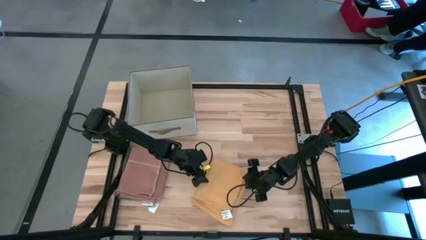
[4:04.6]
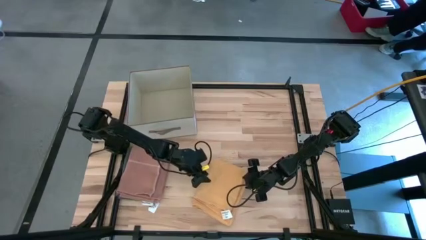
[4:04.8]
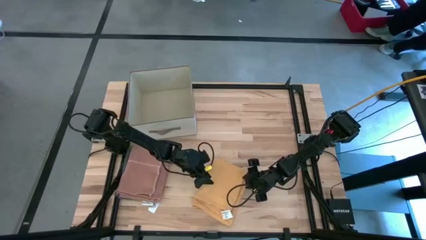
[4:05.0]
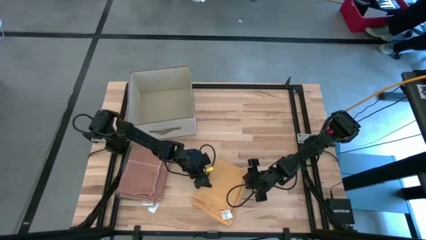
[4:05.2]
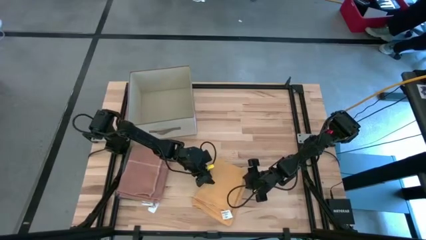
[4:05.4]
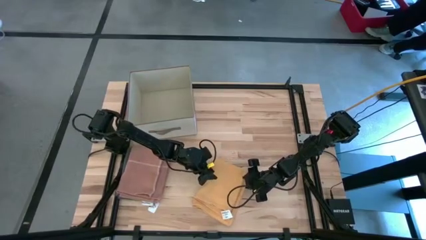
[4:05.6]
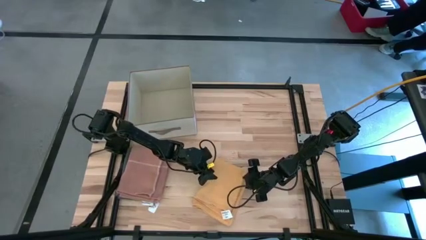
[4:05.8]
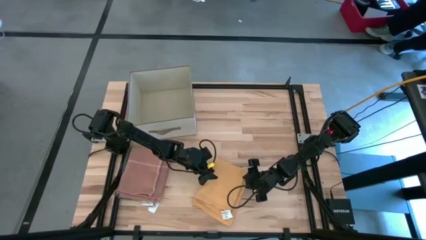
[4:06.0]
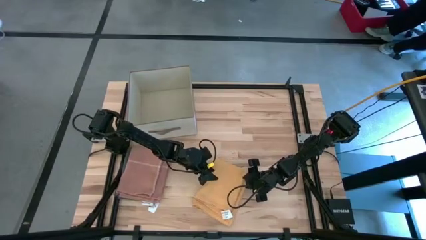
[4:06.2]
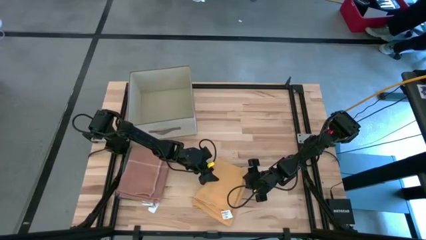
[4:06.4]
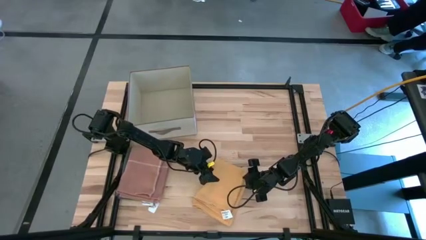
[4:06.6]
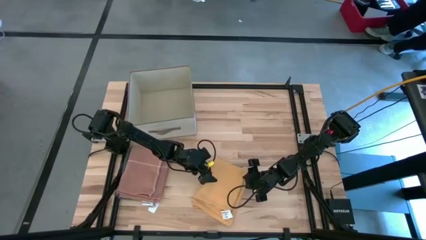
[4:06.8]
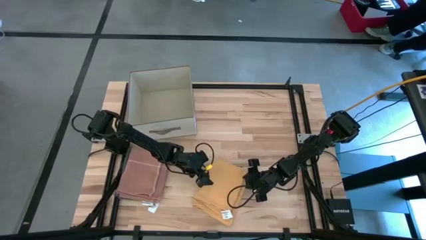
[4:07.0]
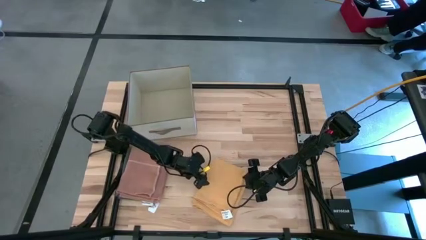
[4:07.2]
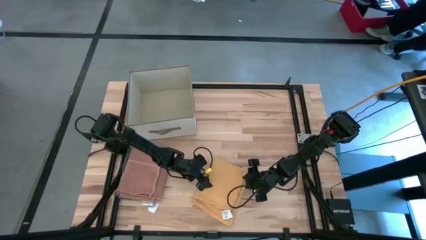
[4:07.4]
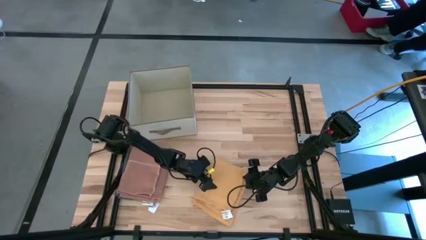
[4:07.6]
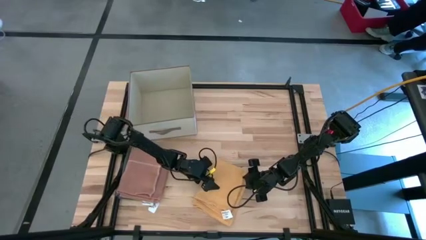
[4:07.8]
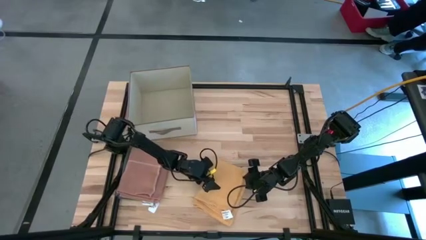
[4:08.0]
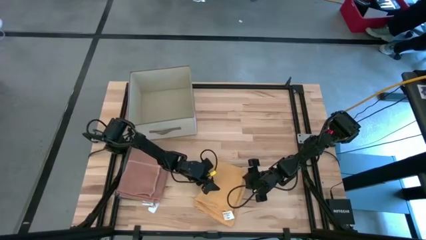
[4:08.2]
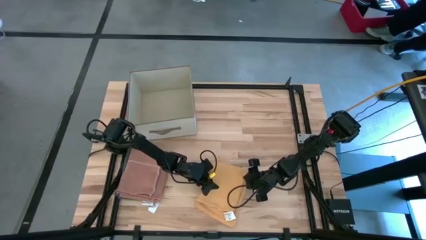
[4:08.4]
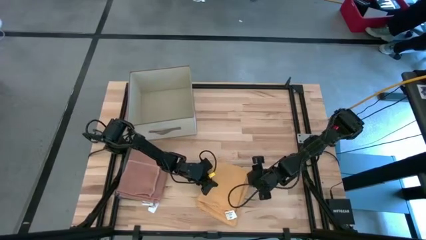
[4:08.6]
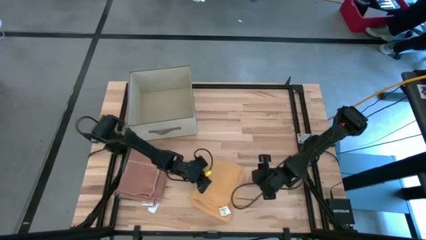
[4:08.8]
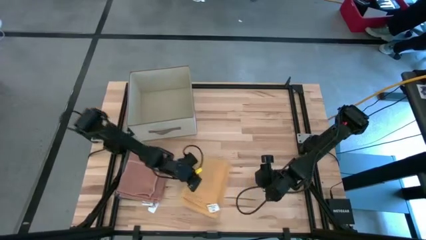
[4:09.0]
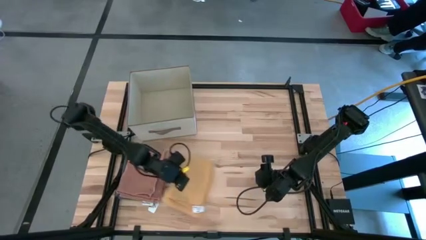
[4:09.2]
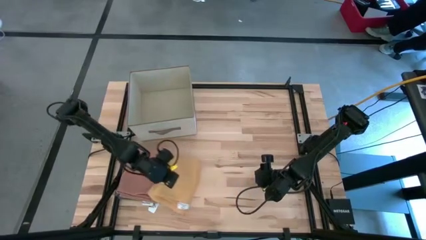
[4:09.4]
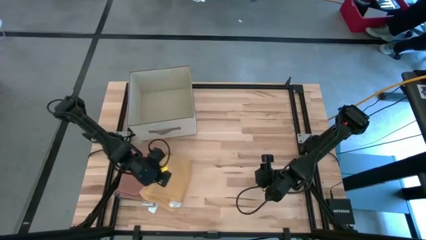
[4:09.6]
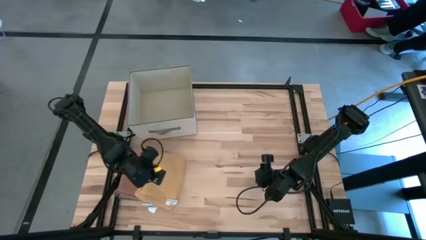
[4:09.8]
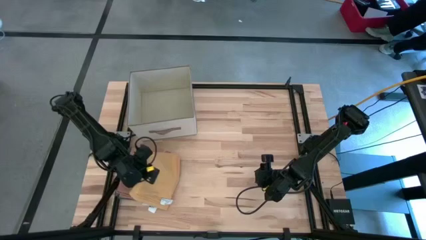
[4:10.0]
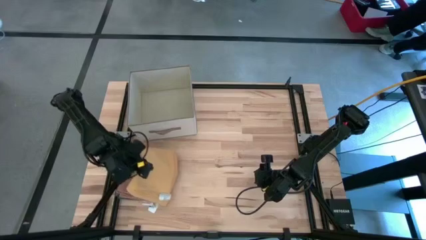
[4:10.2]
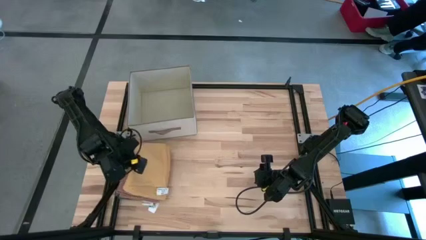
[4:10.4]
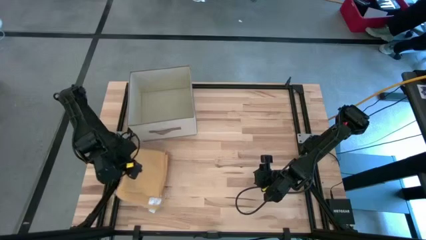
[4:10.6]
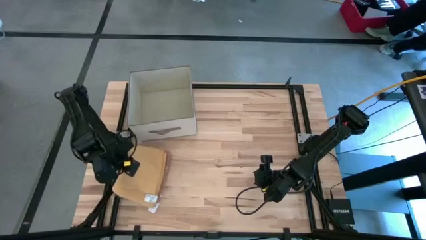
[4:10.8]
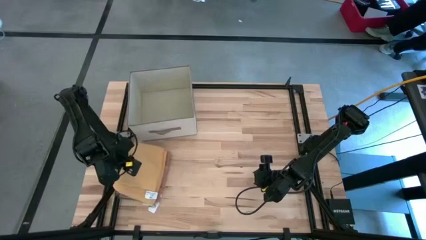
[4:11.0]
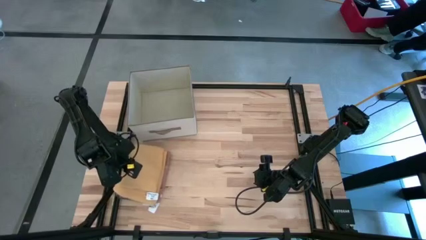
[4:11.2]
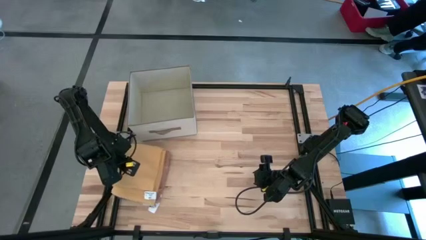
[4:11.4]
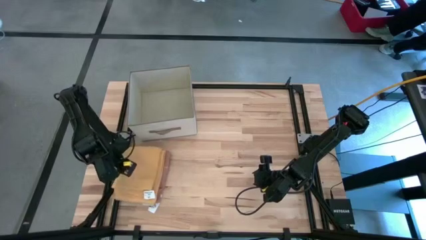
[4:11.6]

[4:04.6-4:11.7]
Task: Fold towel
Stack the yellow towel on the light orange towel

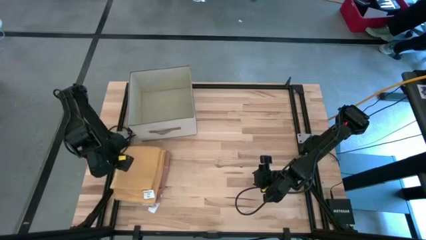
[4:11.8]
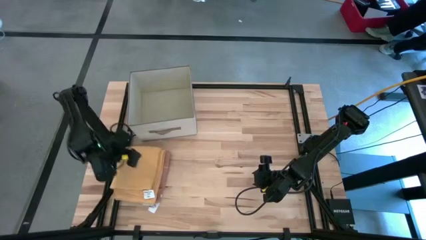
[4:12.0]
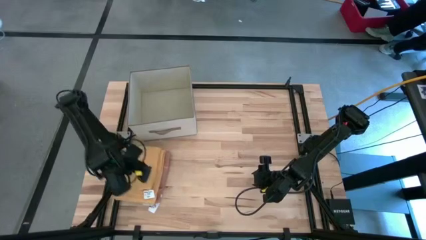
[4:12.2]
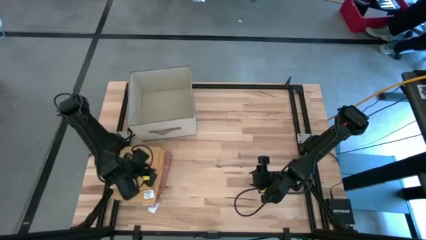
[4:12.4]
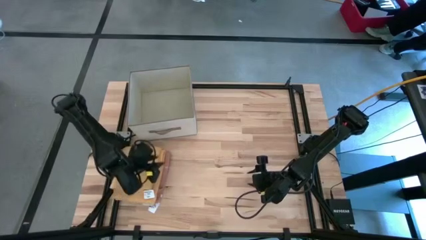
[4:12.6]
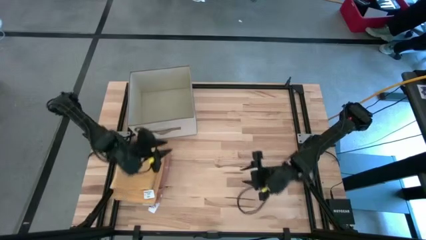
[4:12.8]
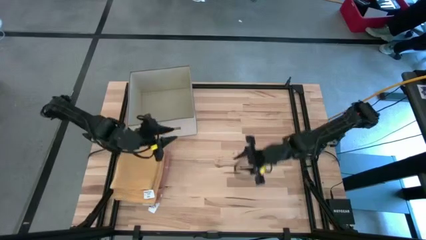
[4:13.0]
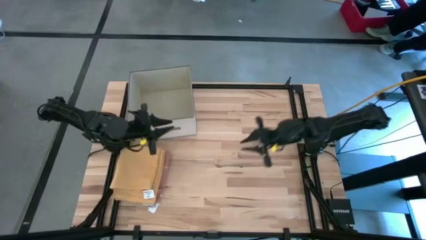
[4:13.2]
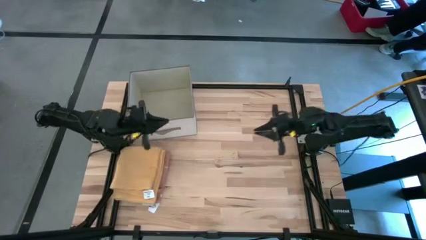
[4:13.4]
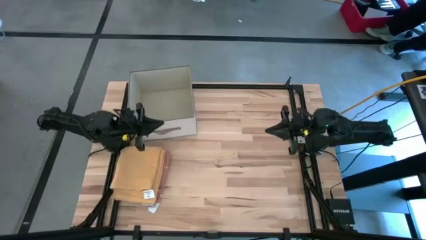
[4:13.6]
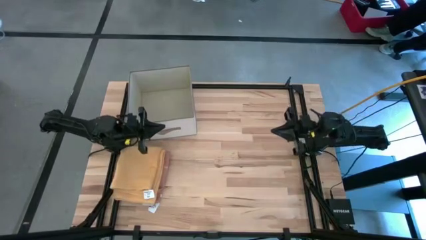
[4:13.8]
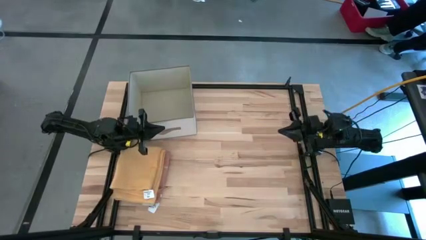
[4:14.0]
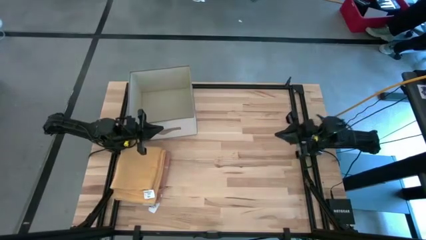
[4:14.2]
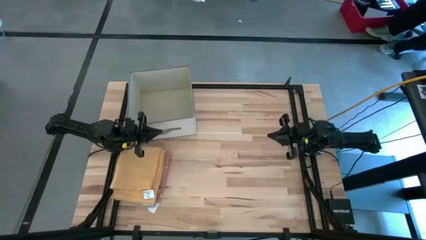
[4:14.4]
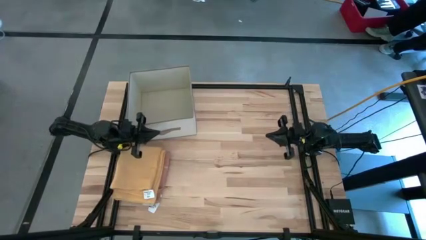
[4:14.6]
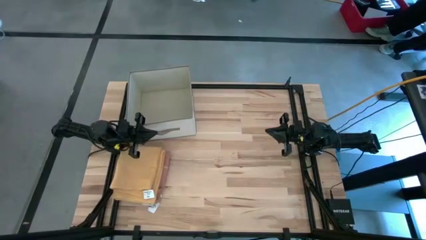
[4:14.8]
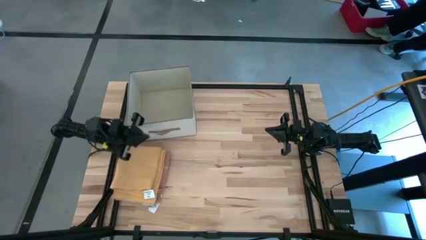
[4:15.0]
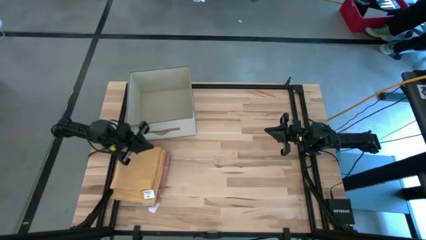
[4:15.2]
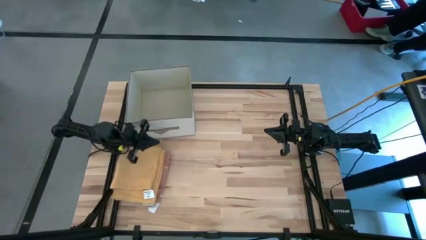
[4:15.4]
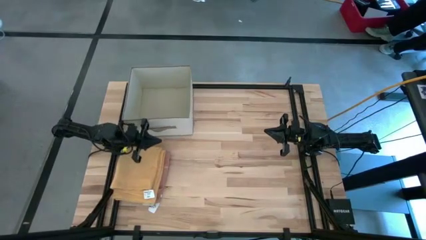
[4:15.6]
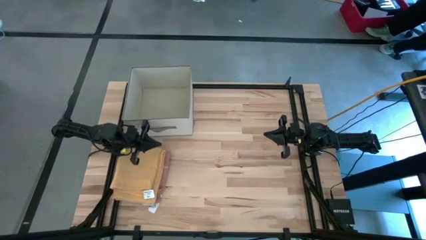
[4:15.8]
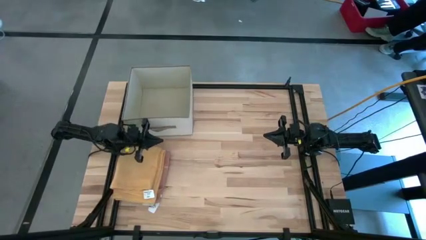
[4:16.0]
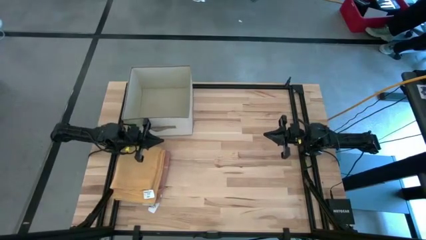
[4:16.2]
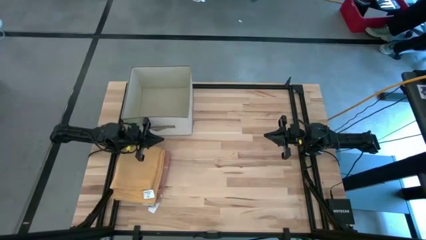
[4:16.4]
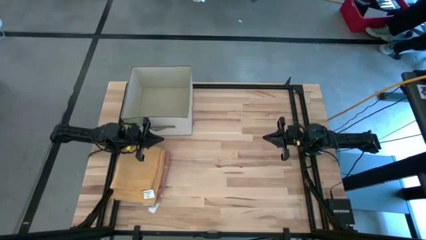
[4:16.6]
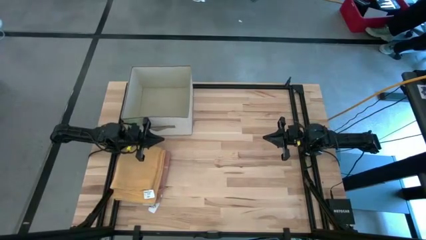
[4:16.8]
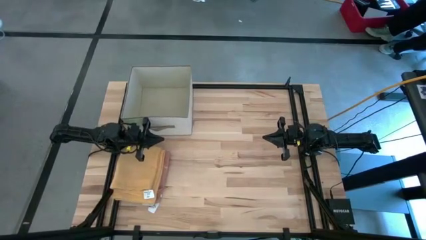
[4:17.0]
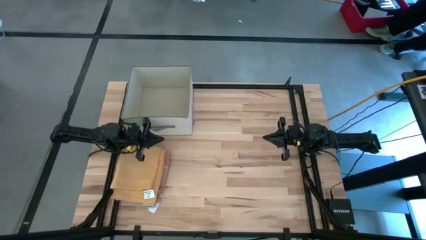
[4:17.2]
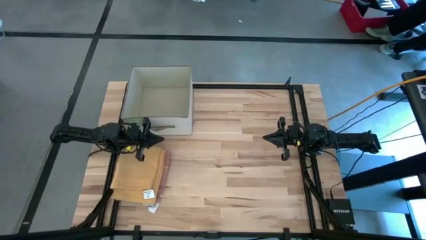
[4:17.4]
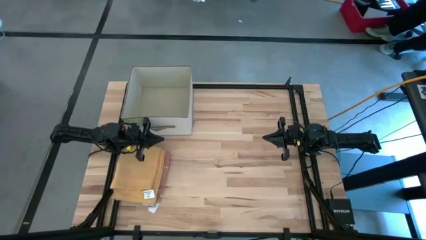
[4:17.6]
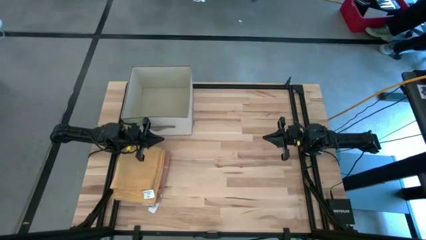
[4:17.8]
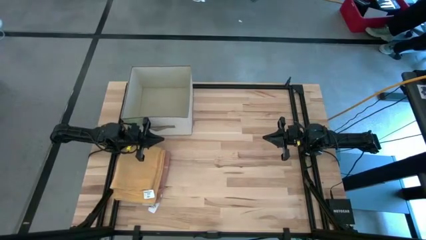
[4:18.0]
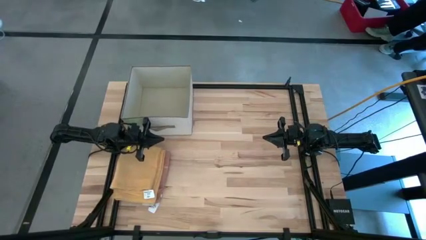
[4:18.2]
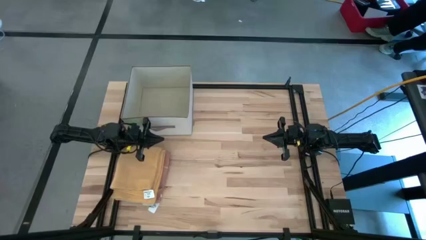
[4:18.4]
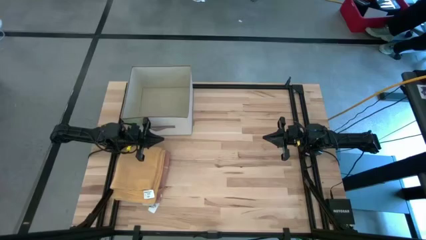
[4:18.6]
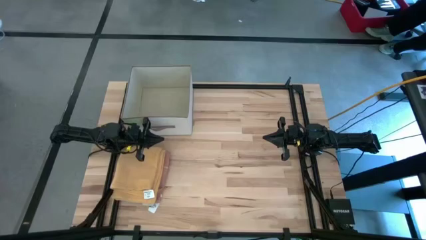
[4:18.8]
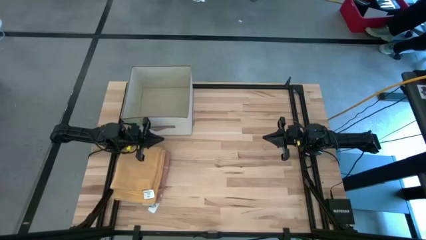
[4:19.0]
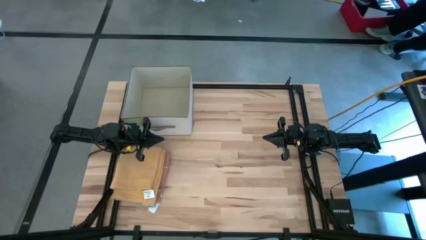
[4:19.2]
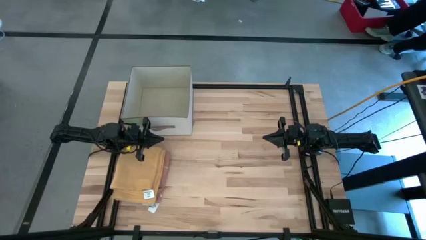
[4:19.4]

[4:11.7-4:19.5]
Return to Home Position

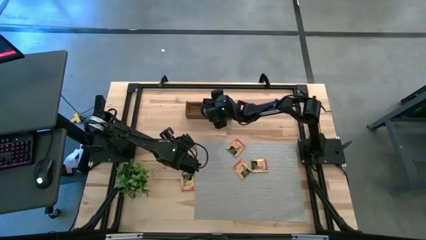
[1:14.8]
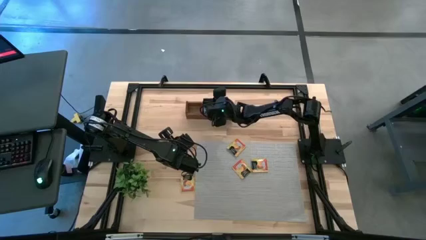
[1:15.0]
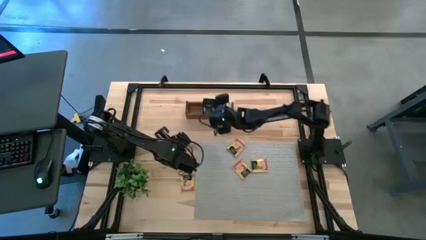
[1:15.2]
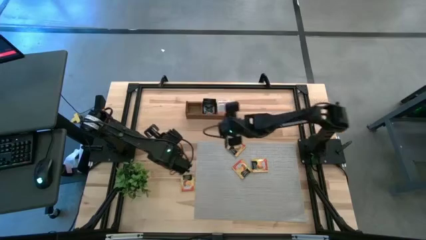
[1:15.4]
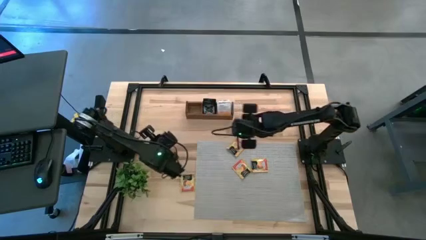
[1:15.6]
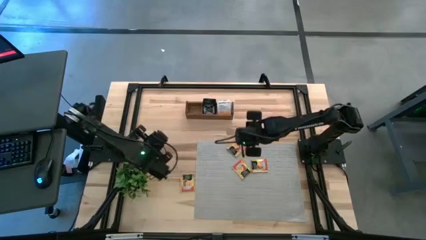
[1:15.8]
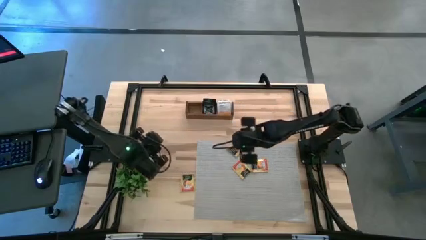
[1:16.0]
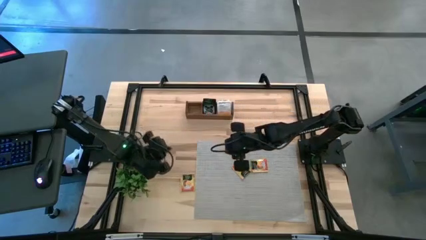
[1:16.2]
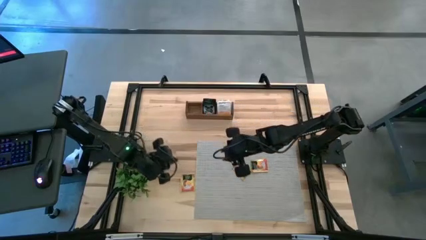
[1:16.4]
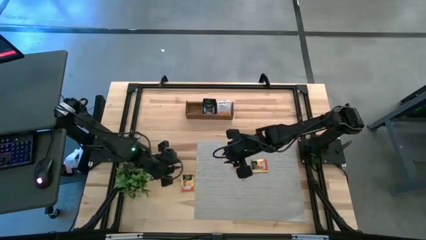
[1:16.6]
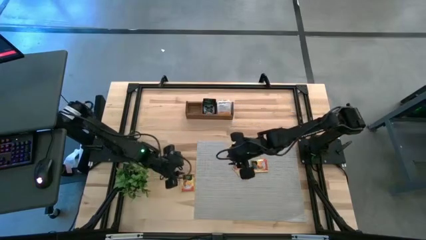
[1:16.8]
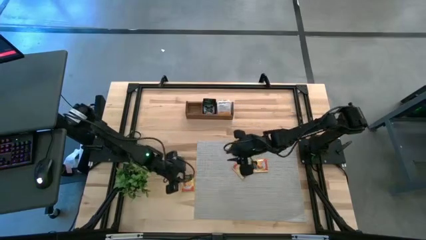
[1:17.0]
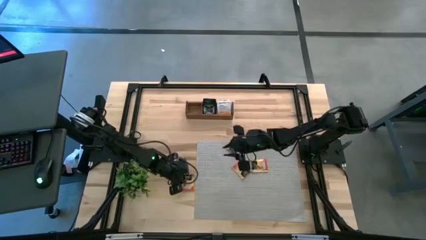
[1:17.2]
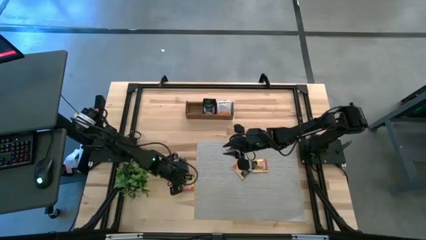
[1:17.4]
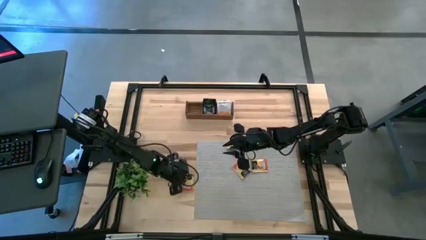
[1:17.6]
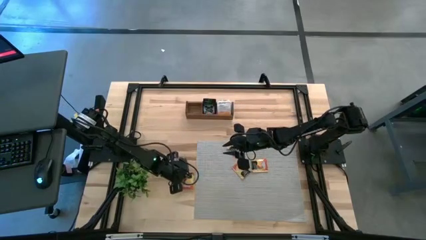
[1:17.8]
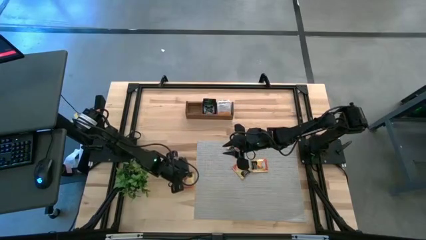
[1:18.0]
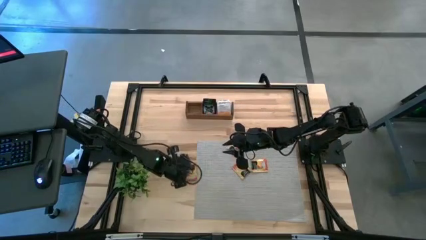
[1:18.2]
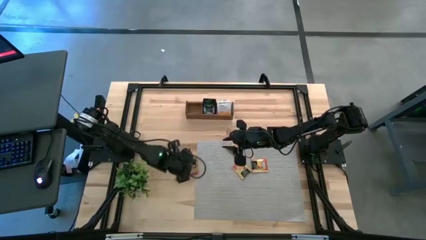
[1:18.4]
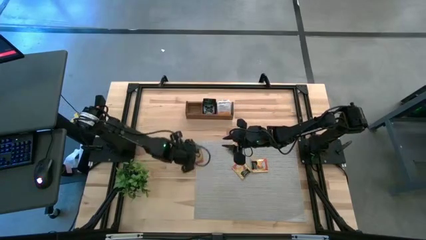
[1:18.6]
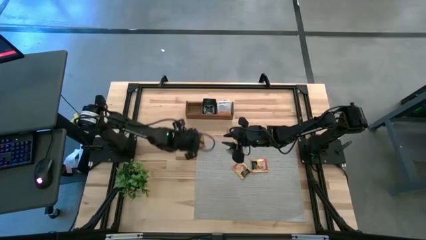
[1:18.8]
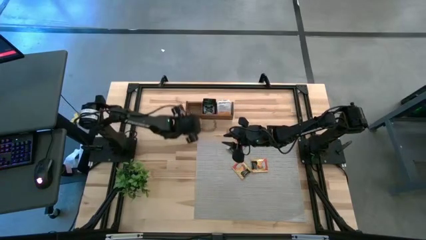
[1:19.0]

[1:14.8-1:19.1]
Task: Pick & Place Tea
Put the orange tea bag into the left section of the wooden organizer
